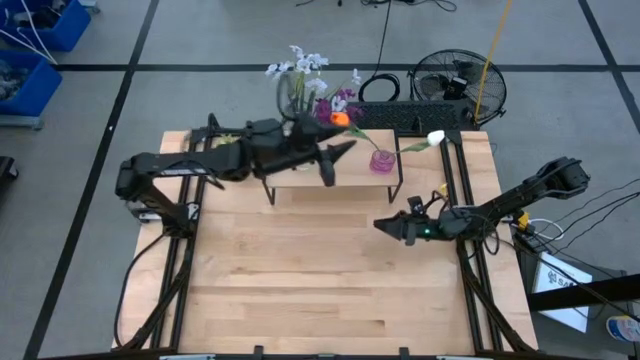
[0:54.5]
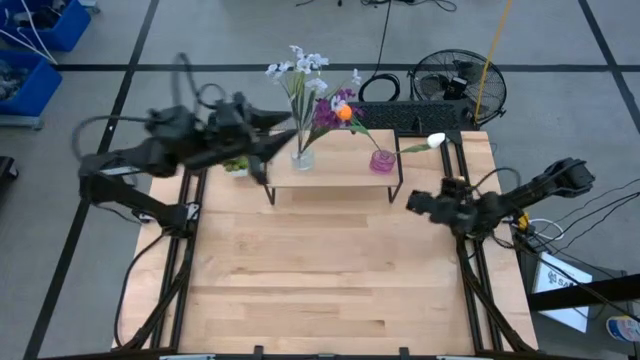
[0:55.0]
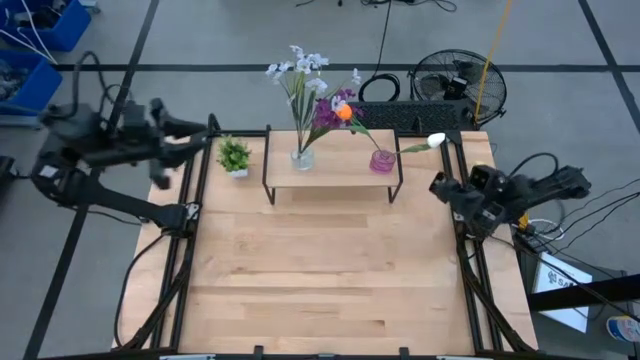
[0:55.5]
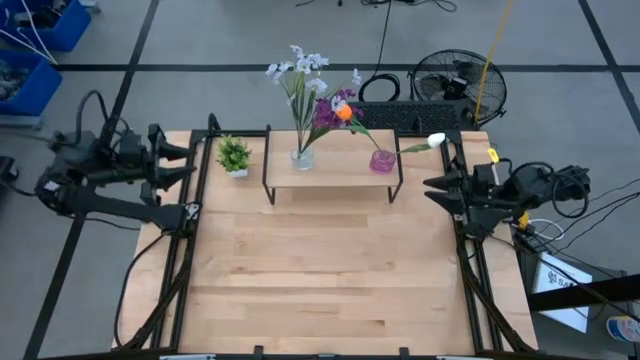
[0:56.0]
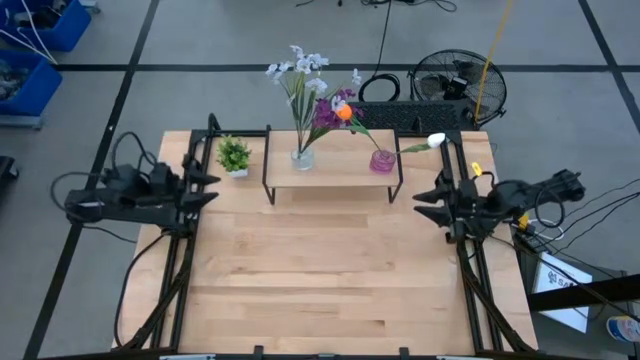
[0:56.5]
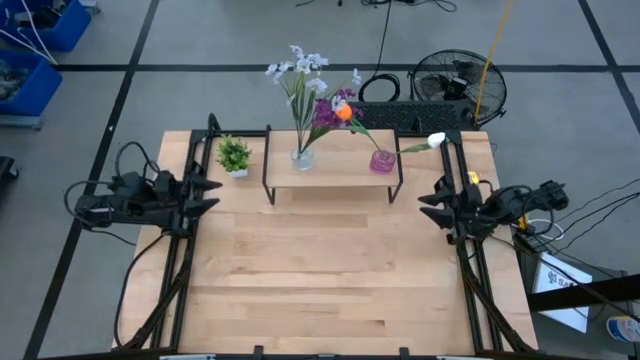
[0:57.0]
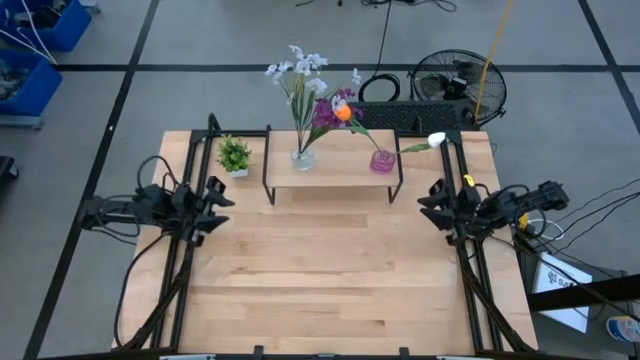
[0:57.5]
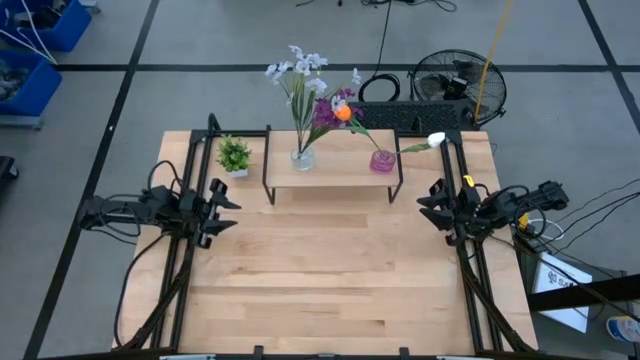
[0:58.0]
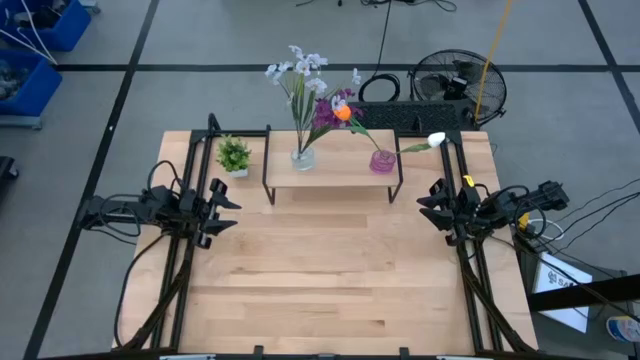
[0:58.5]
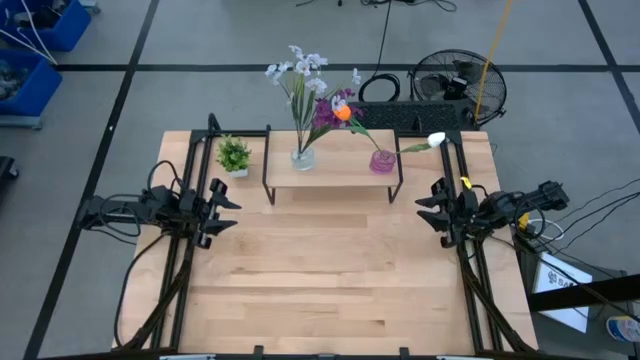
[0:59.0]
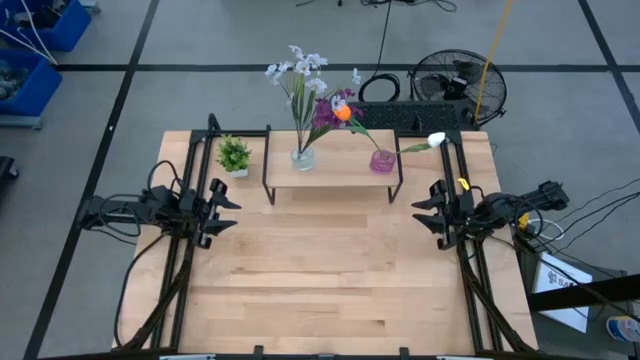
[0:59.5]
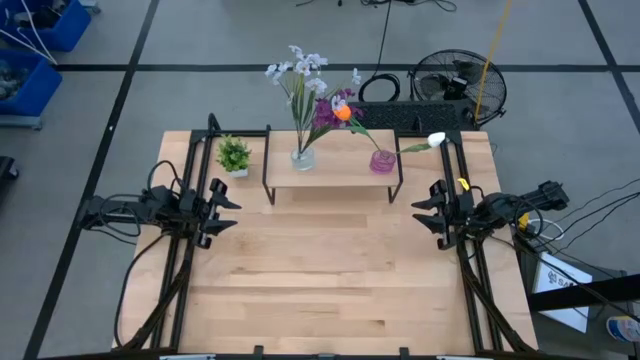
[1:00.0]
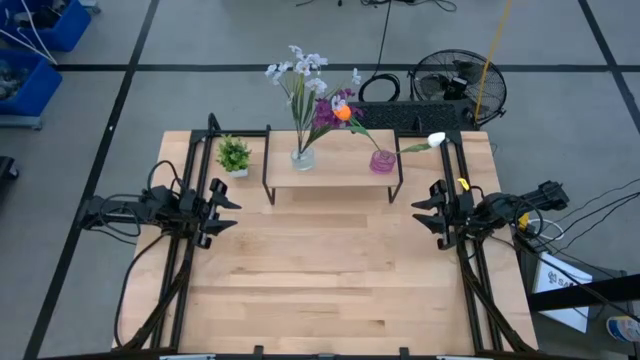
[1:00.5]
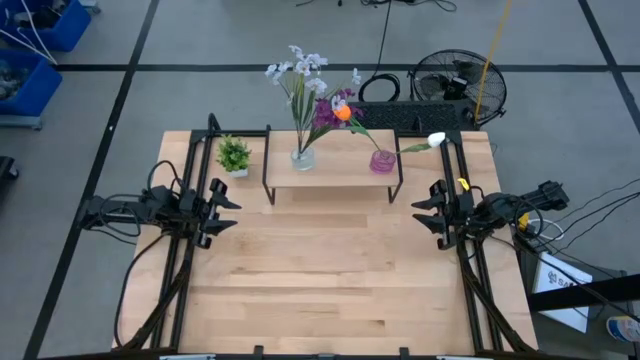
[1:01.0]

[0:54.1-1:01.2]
Task: Pick and place flowers into a vace then onto a shelf
Return to Home Position

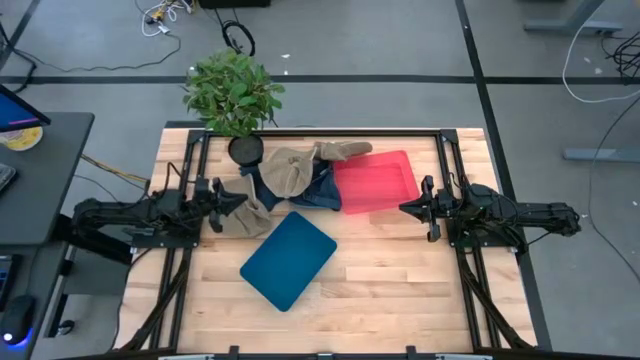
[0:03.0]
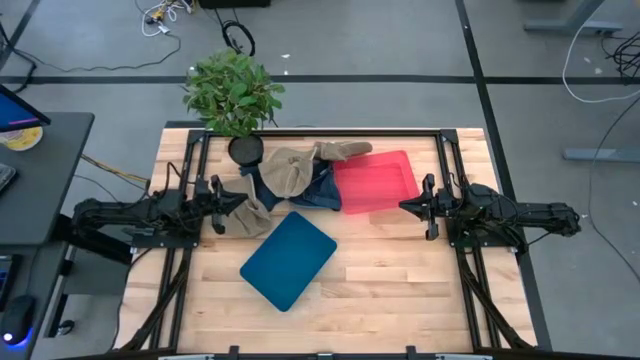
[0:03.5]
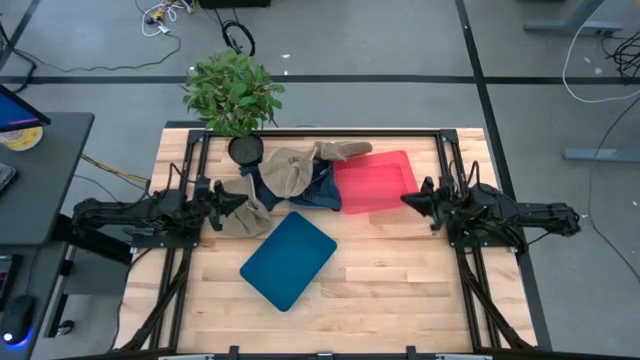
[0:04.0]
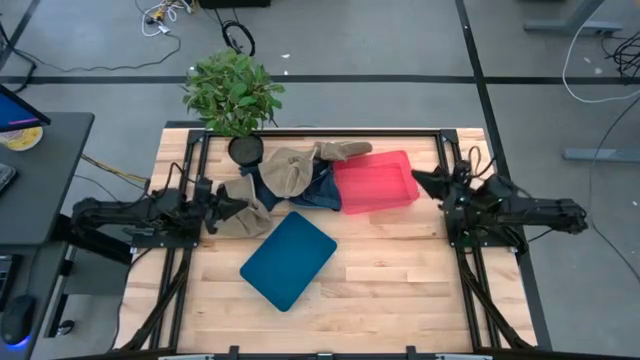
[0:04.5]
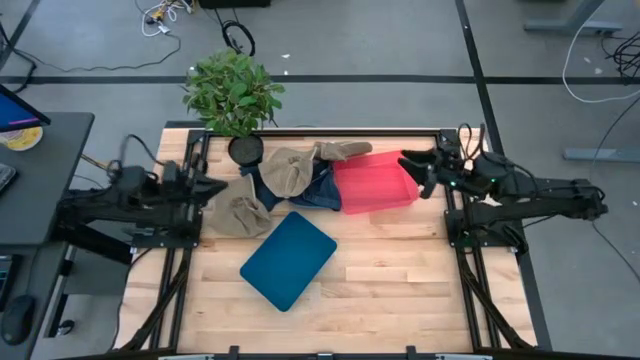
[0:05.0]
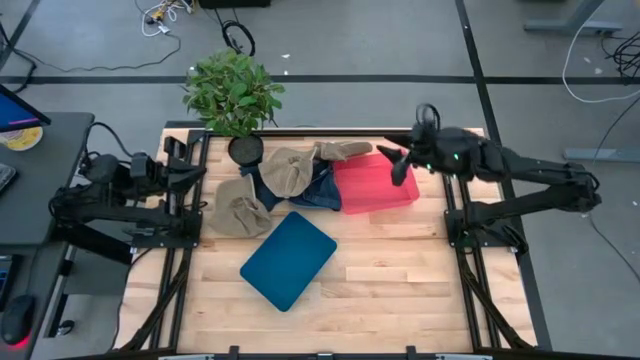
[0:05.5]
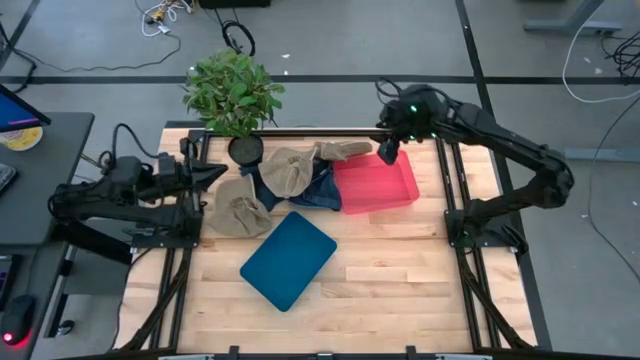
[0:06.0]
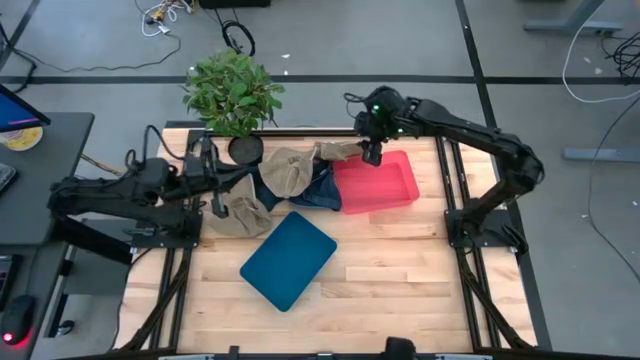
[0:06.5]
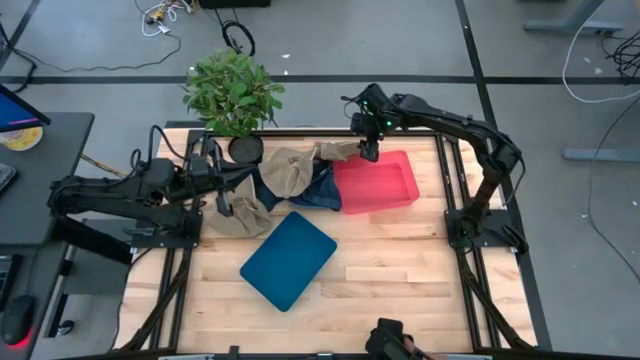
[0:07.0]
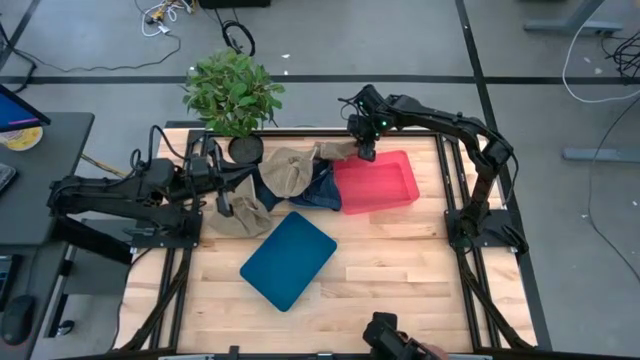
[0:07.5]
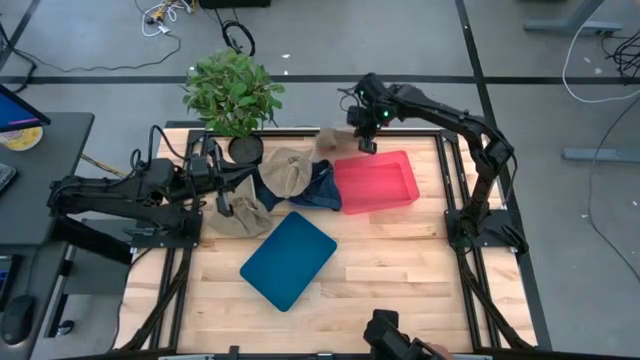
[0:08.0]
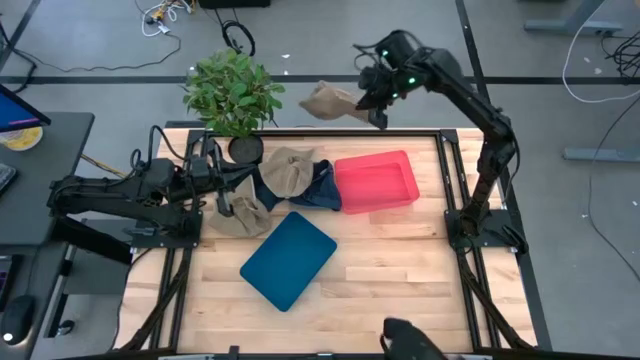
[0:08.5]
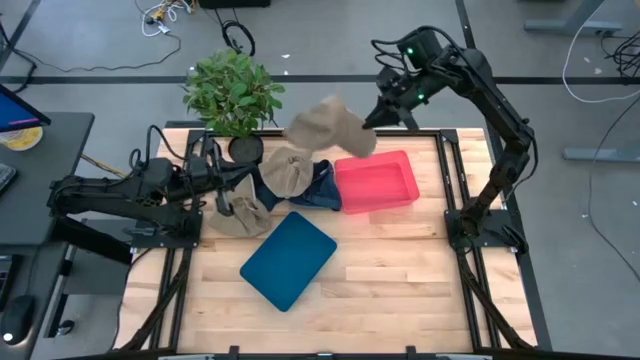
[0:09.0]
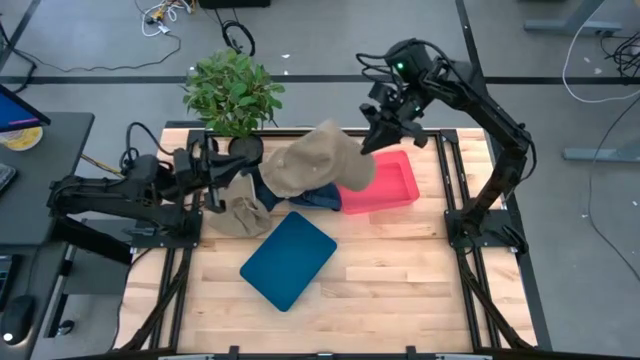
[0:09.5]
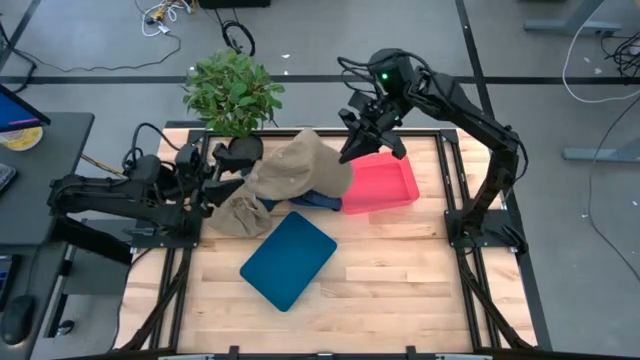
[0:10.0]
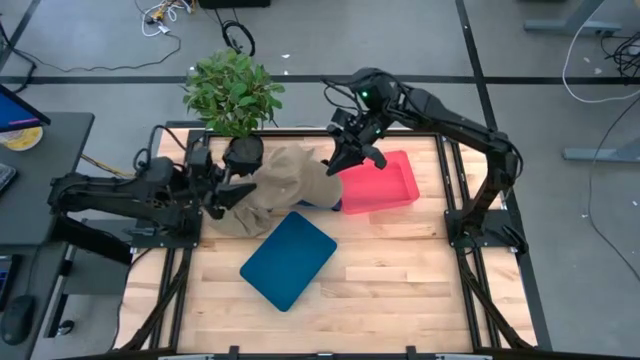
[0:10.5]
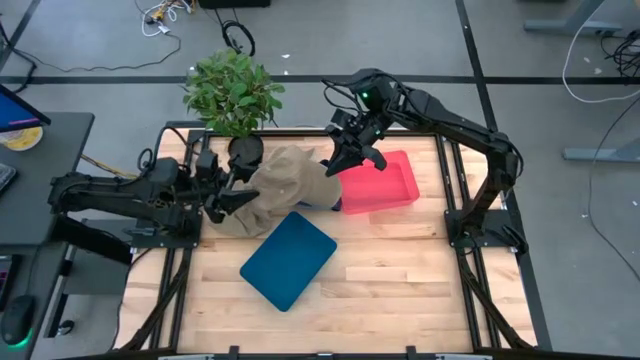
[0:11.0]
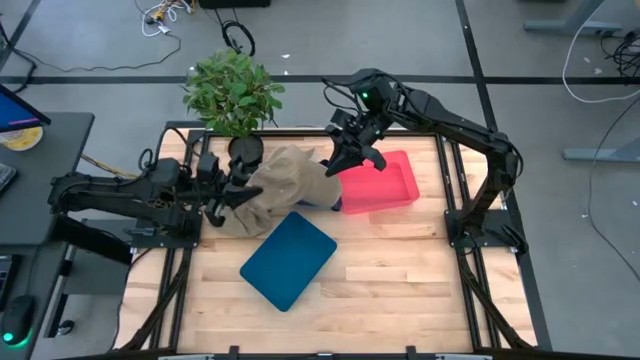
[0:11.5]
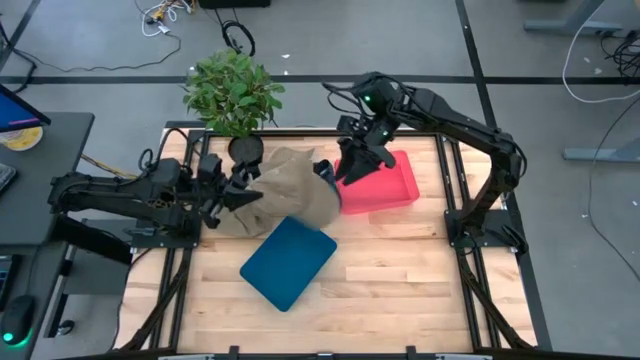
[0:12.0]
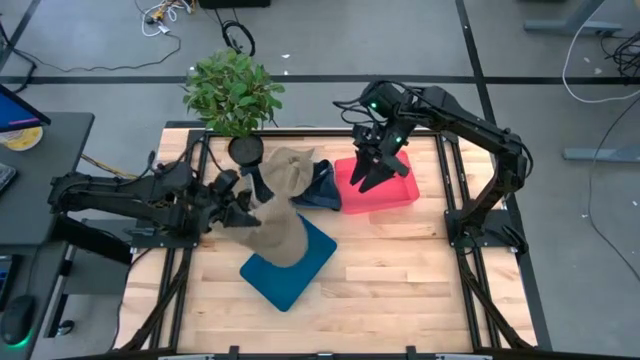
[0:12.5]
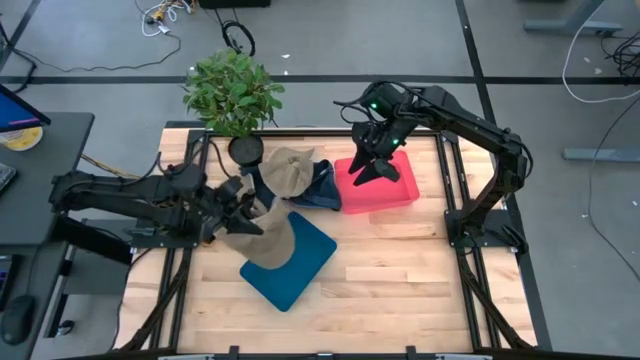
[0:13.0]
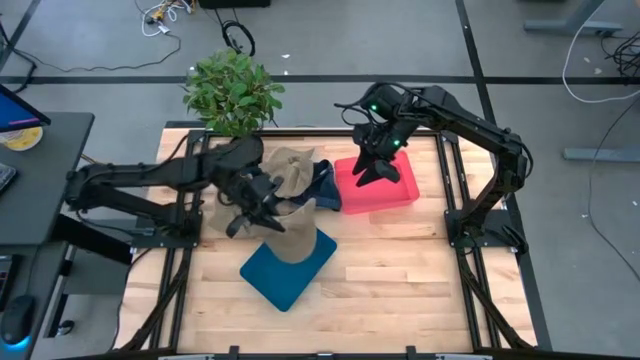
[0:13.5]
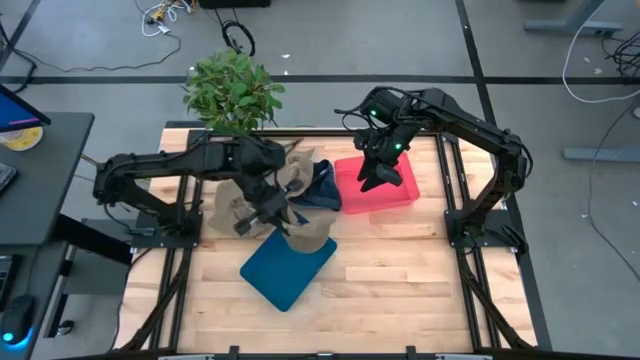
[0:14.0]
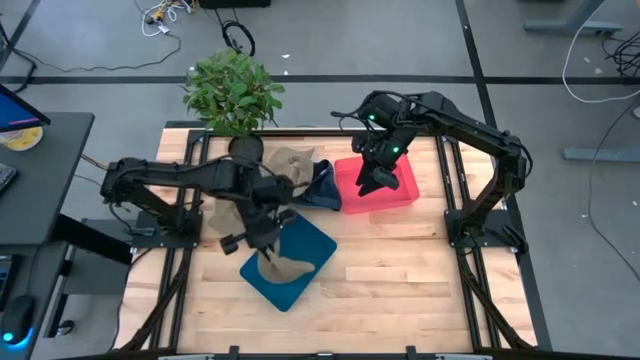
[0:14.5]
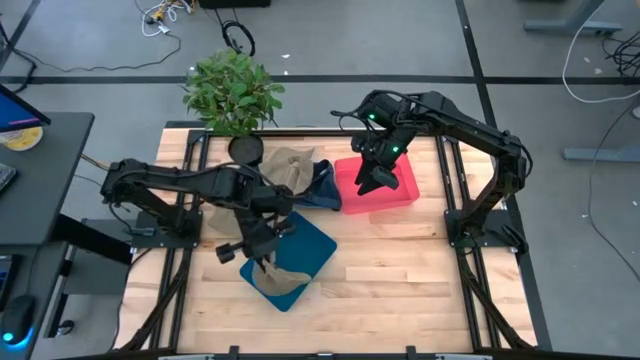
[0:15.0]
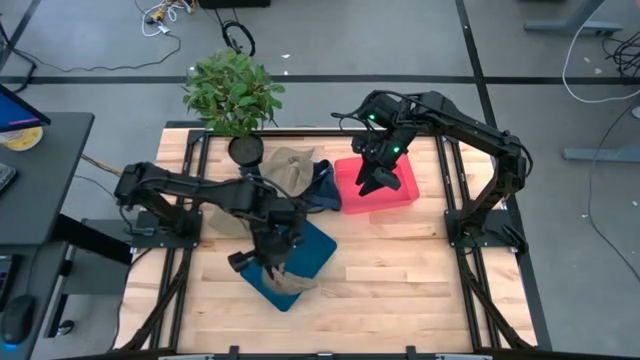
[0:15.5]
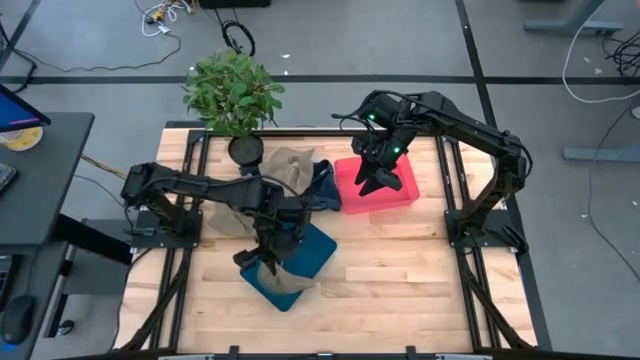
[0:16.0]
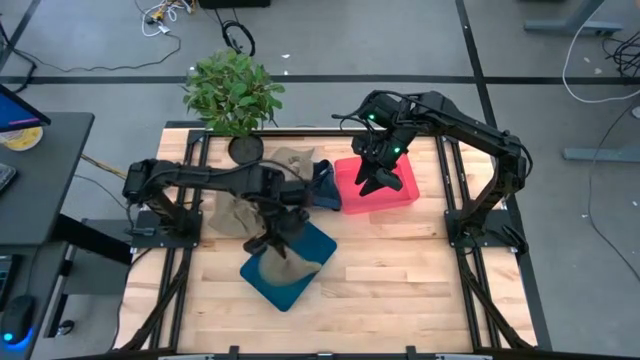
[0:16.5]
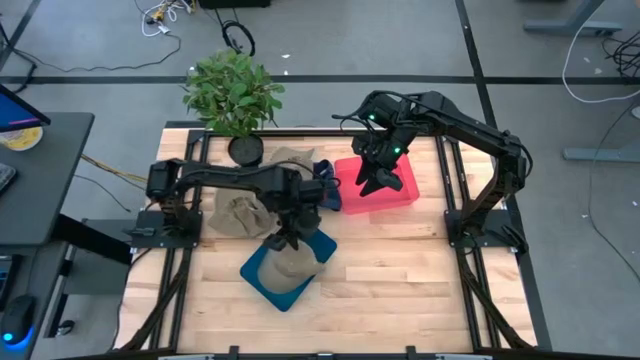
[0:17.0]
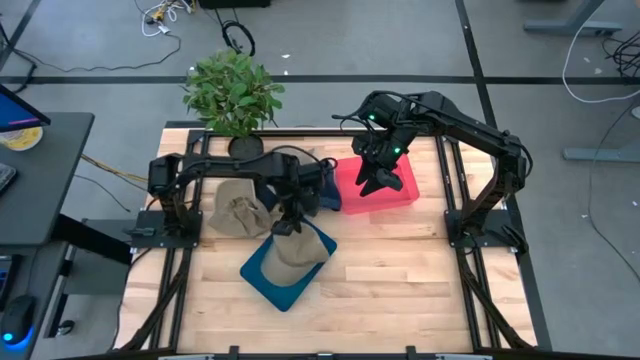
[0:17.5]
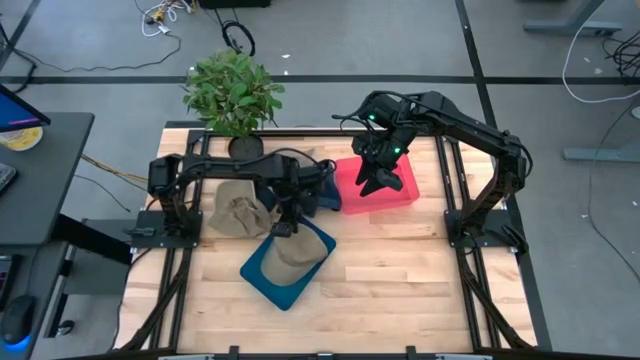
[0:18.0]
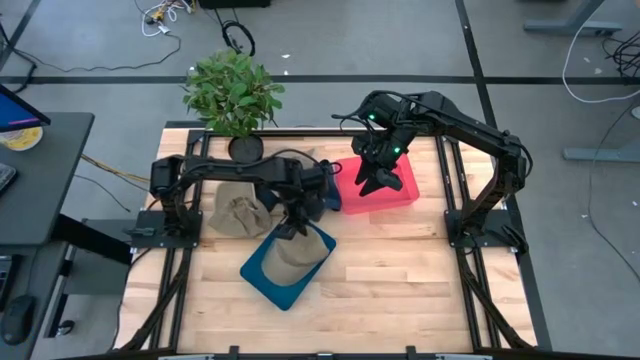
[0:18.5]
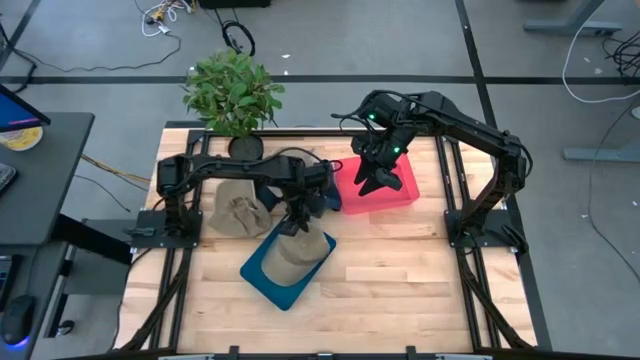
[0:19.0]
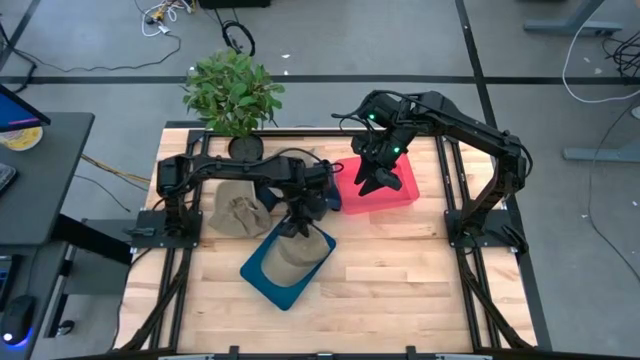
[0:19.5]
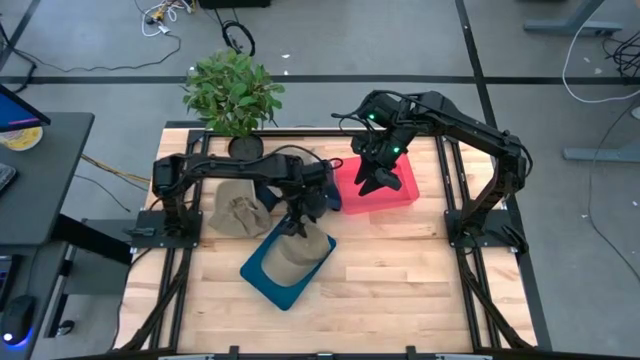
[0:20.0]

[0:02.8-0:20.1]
Task: Pick & Place hat
Put the right brown cap into the blue bin
